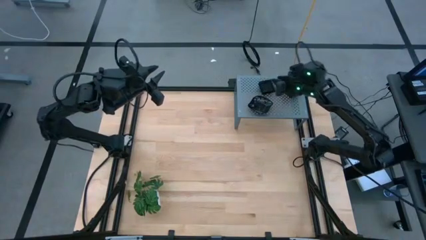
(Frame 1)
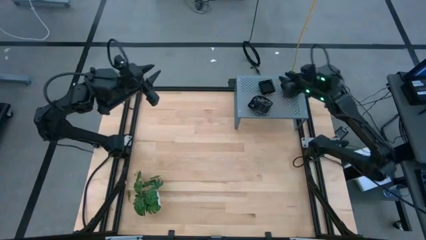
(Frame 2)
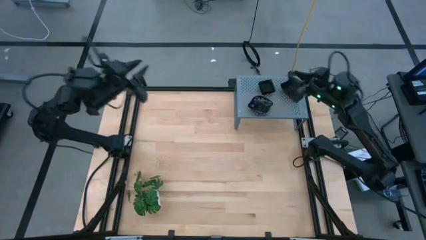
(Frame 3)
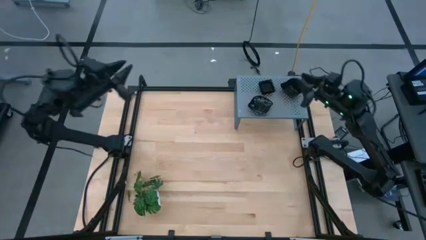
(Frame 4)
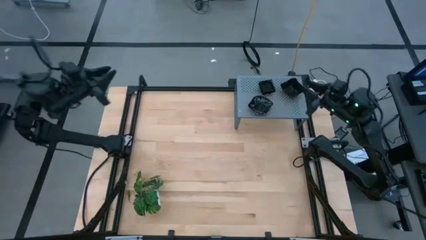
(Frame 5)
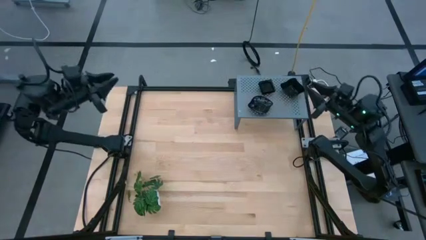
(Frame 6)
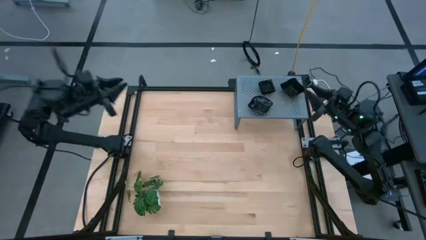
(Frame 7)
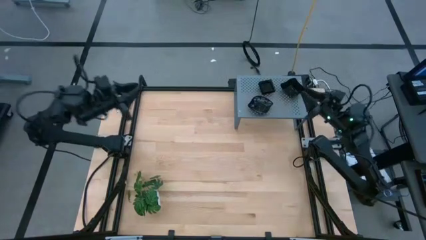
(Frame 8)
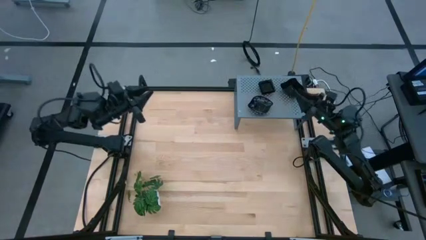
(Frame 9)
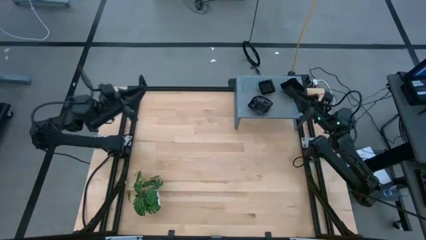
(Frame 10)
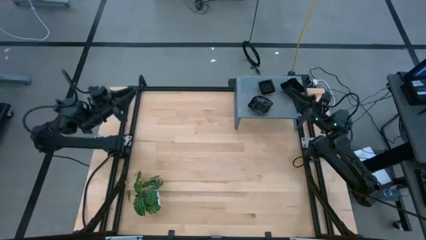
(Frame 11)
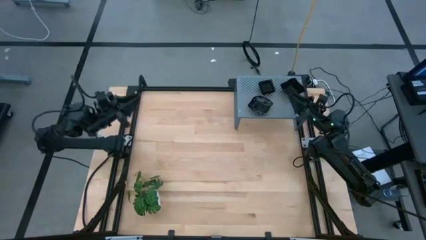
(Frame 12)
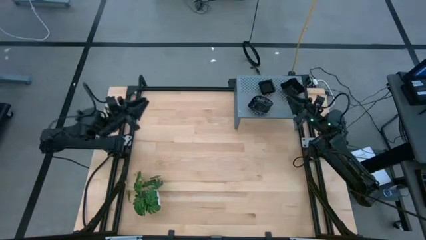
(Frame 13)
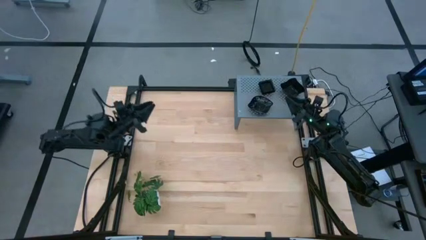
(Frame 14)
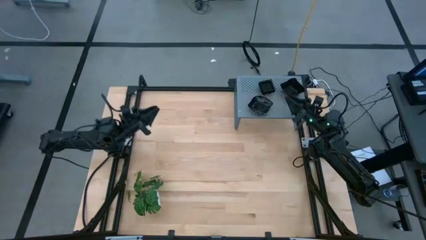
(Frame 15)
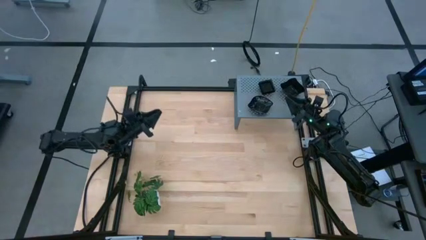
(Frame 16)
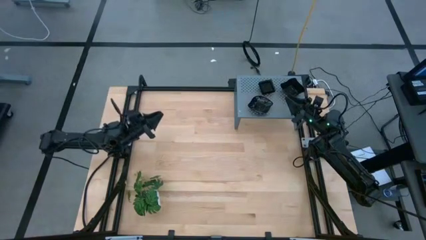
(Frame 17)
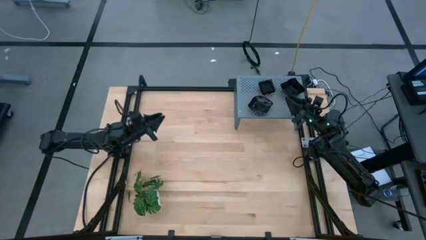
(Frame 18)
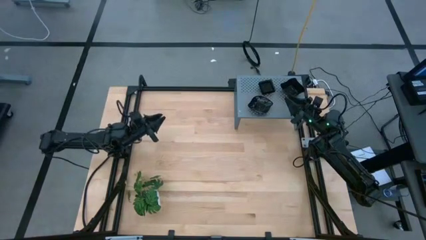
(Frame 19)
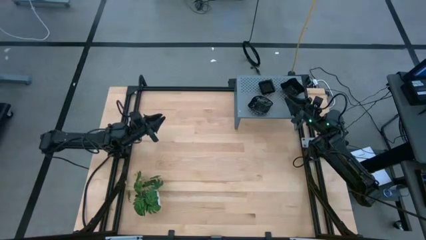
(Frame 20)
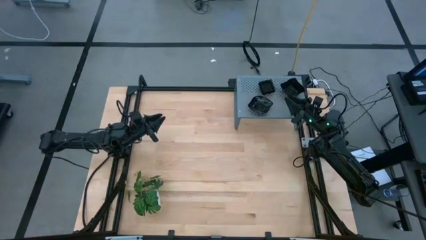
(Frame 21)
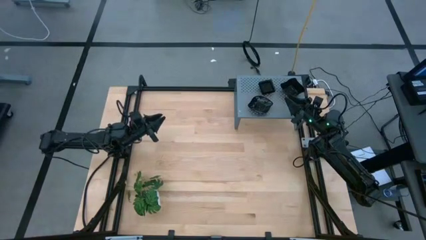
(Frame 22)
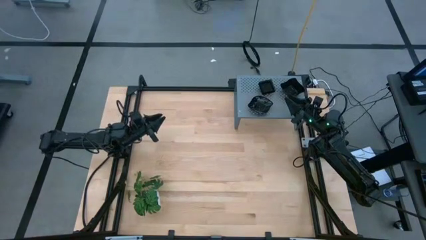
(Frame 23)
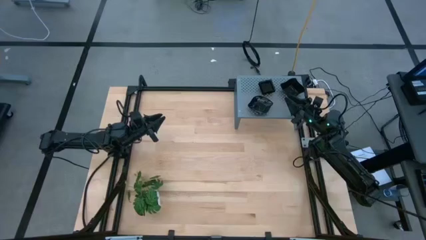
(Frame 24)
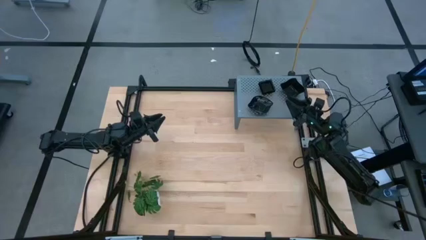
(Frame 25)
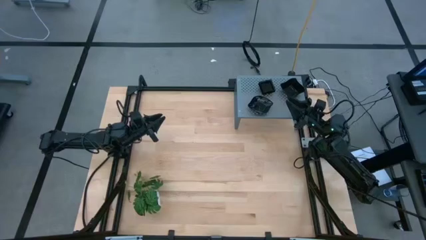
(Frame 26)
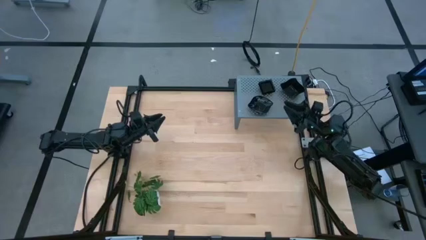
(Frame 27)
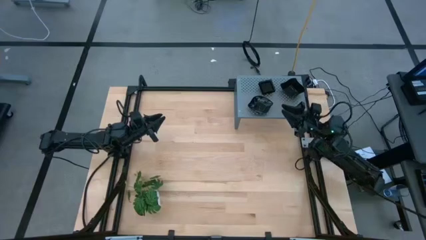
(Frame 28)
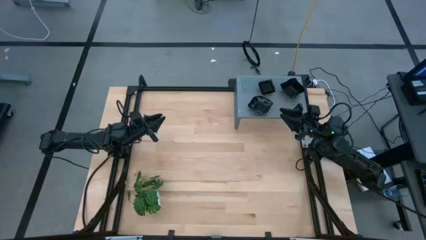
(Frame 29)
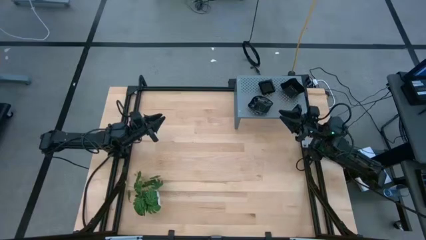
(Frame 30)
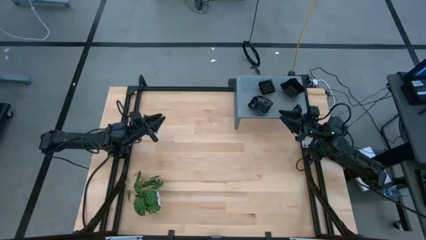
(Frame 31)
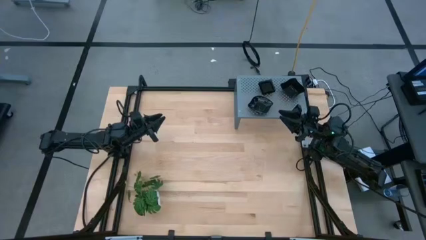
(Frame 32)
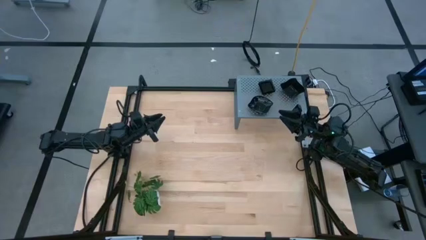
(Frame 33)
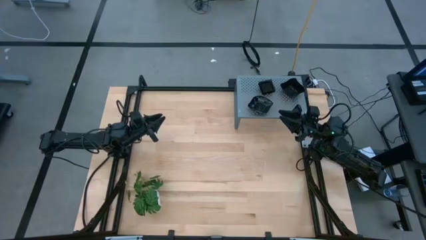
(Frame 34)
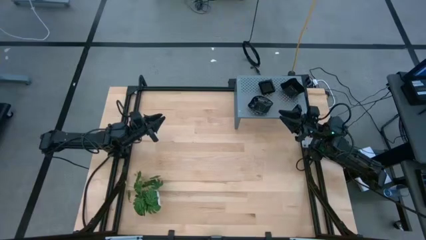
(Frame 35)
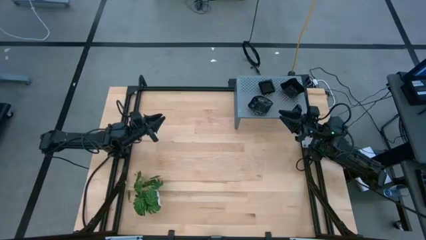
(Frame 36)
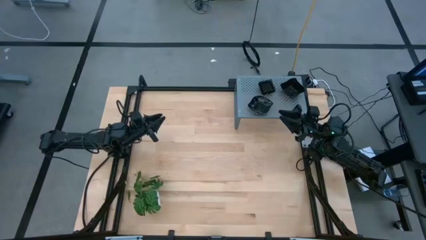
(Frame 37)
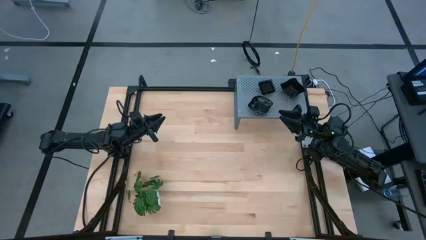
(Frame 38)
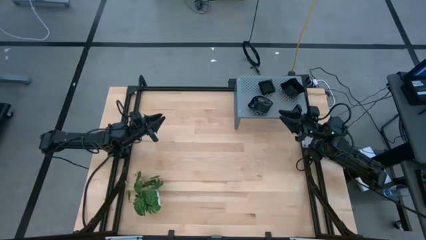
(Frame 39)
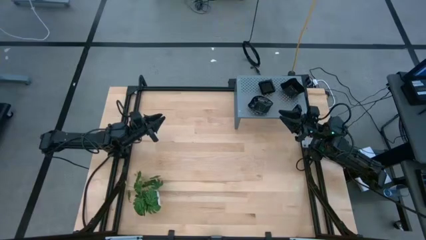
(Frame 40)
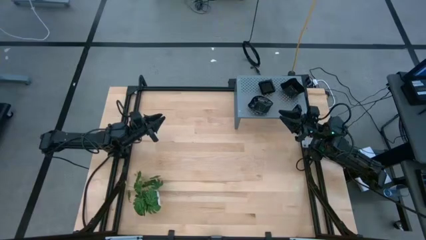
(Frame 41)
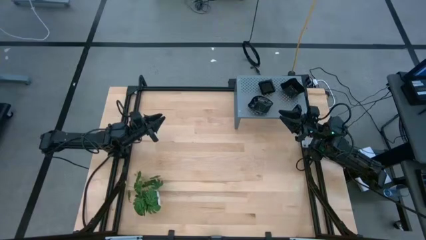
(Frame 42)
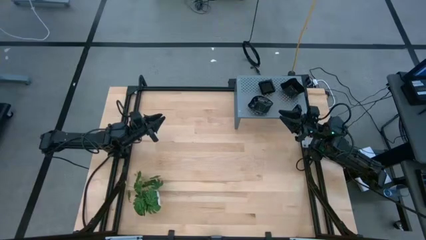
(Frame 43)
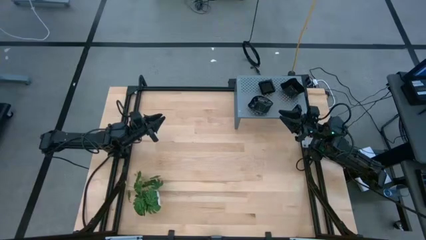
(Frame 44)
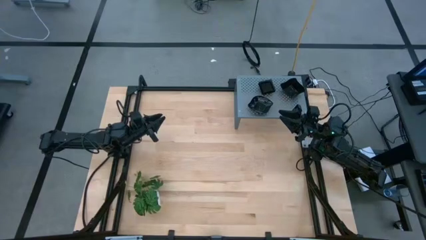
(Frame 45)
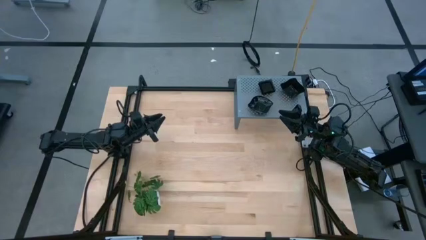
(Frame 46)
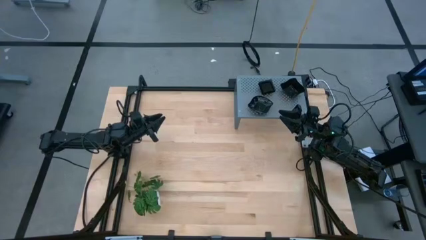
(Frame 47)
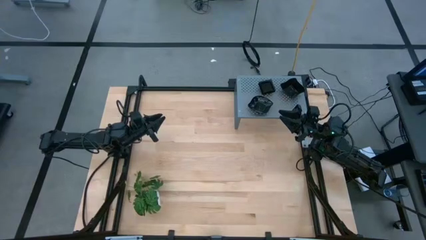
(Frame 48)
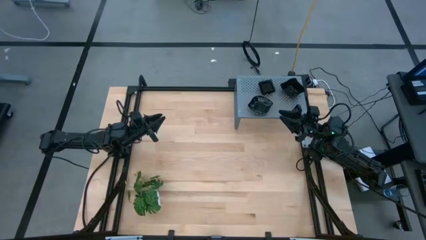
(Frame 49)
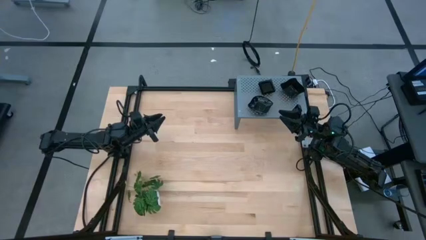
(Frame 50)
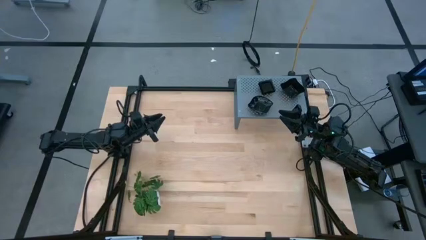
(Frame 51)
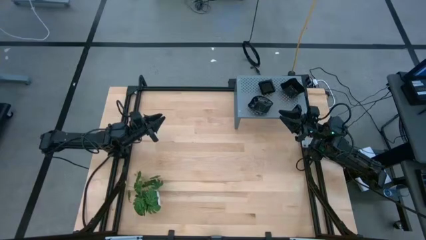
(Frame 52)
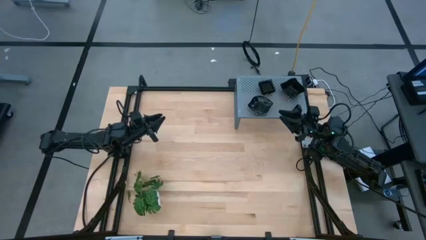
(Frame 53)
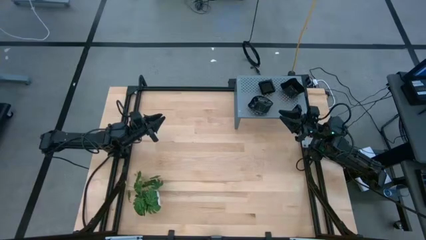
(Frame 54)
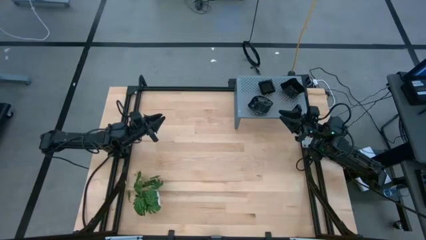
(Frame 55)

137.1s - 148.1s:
Task: Pick & Place Mini shaped plates
Return to Home Position
